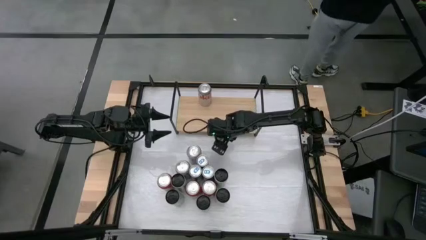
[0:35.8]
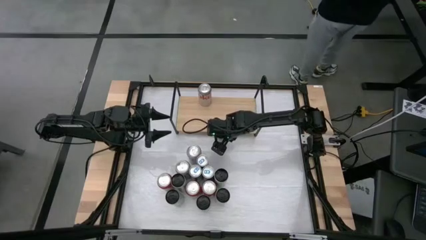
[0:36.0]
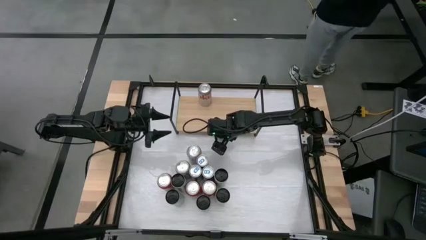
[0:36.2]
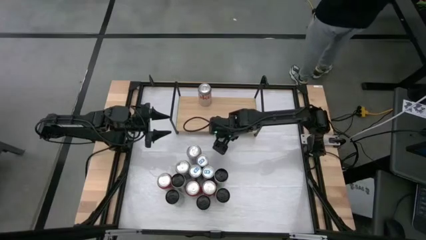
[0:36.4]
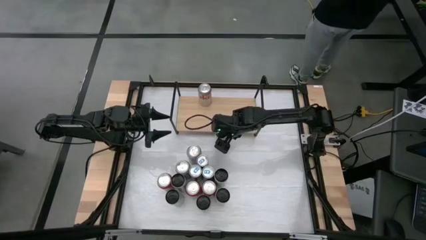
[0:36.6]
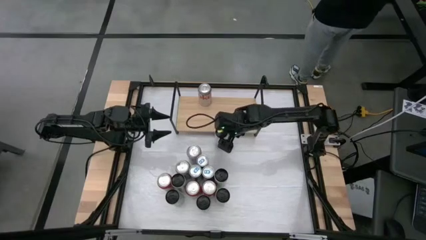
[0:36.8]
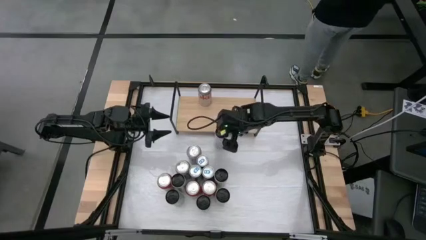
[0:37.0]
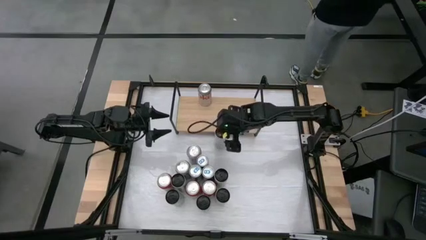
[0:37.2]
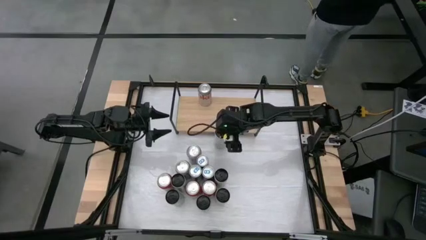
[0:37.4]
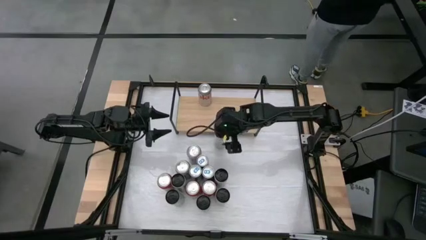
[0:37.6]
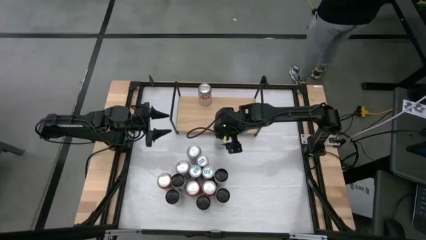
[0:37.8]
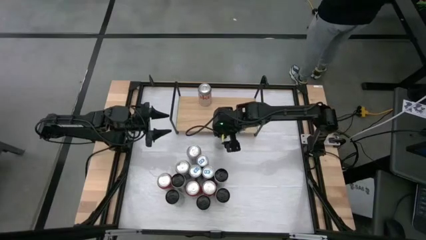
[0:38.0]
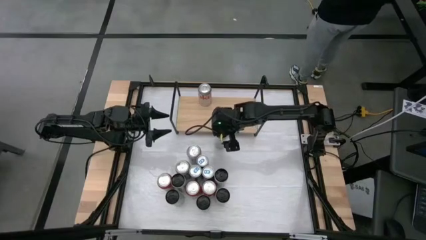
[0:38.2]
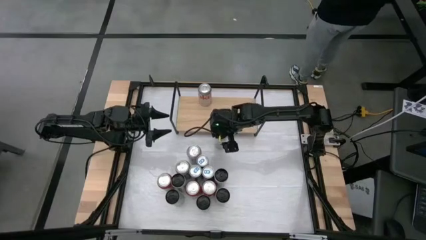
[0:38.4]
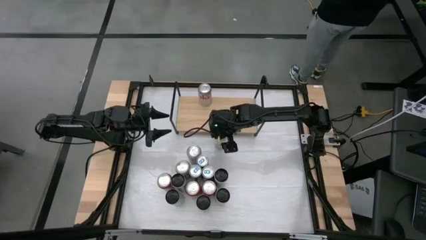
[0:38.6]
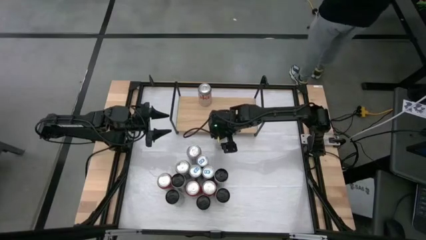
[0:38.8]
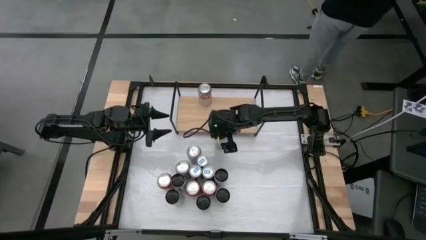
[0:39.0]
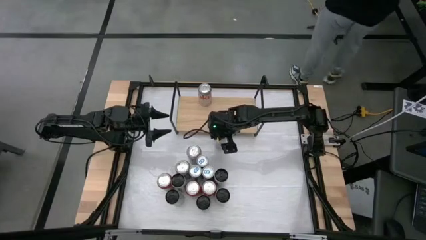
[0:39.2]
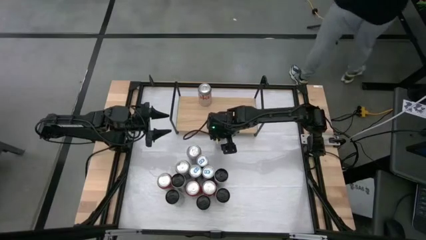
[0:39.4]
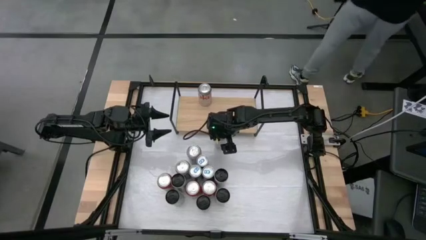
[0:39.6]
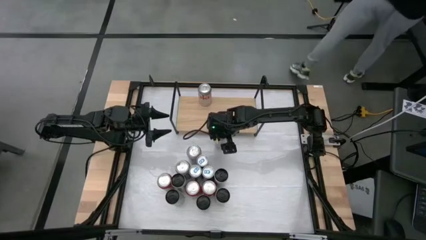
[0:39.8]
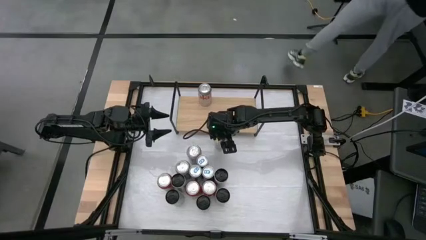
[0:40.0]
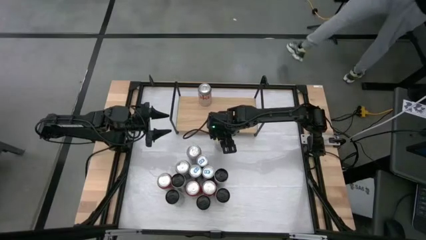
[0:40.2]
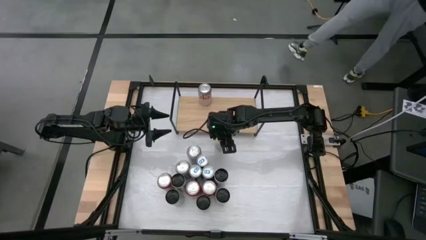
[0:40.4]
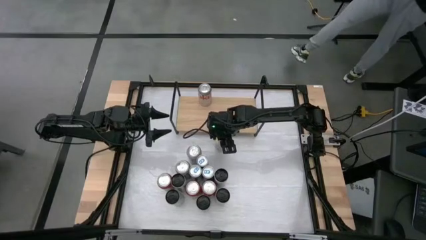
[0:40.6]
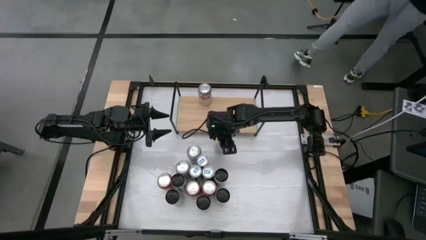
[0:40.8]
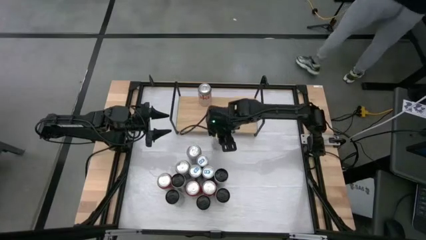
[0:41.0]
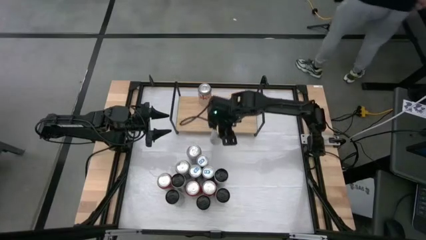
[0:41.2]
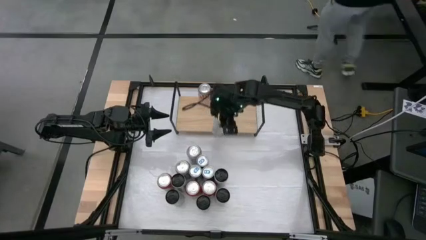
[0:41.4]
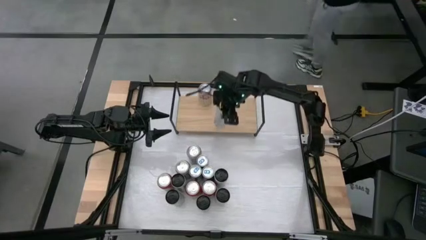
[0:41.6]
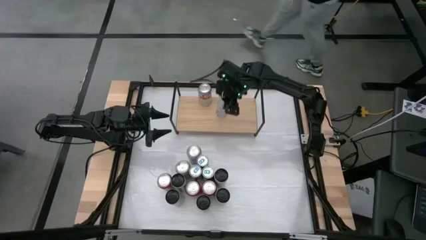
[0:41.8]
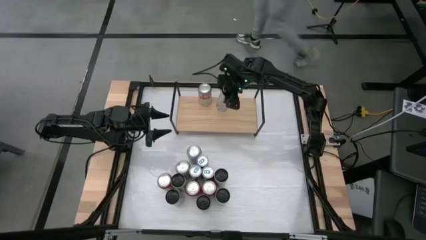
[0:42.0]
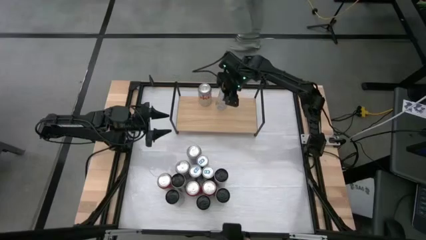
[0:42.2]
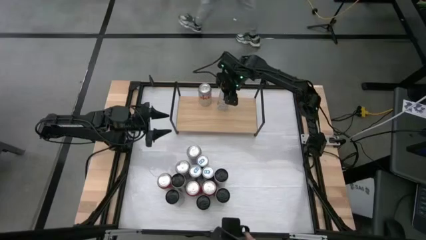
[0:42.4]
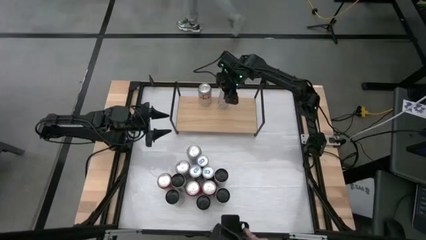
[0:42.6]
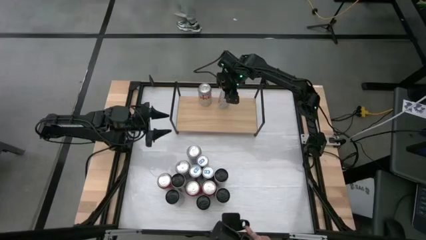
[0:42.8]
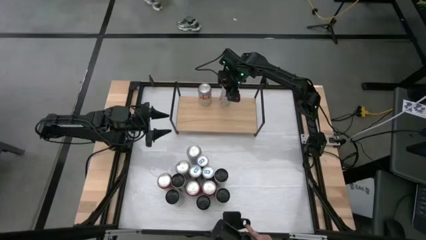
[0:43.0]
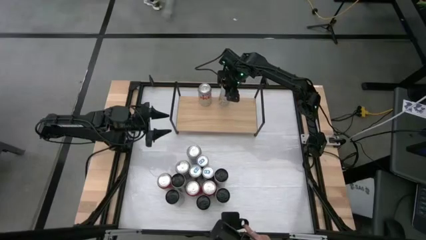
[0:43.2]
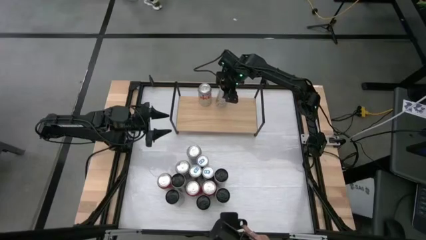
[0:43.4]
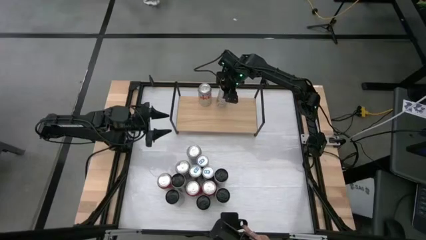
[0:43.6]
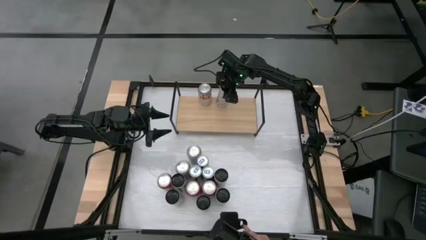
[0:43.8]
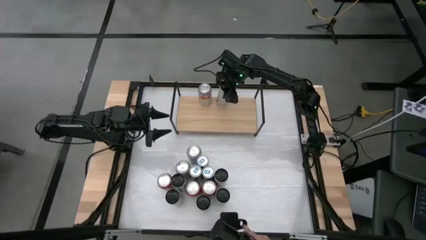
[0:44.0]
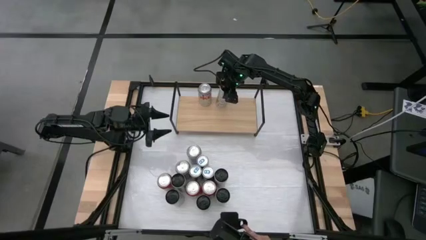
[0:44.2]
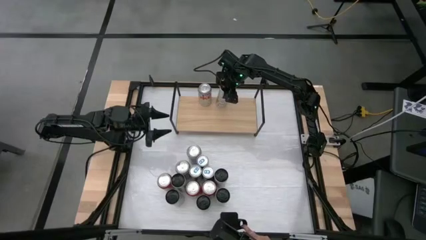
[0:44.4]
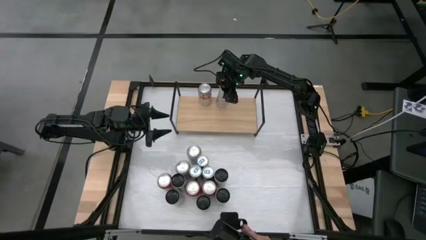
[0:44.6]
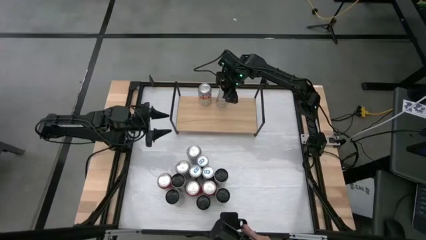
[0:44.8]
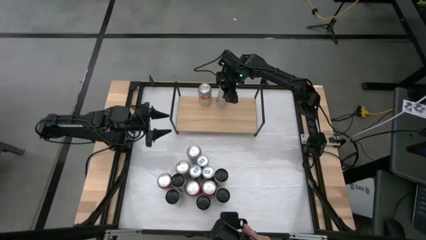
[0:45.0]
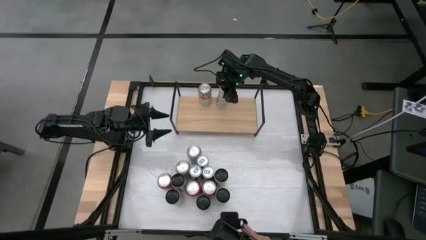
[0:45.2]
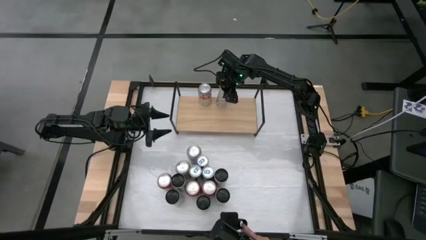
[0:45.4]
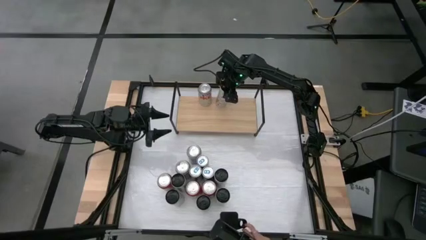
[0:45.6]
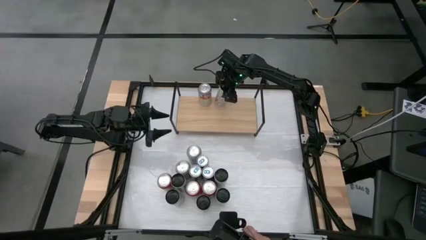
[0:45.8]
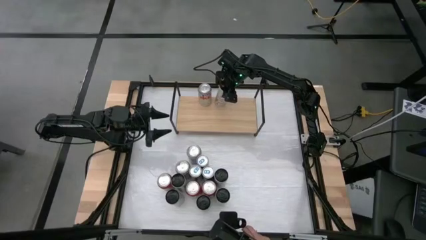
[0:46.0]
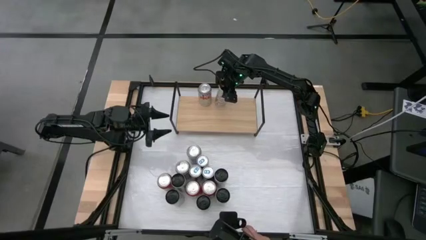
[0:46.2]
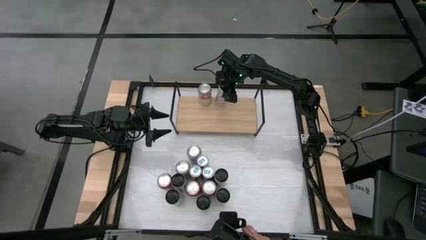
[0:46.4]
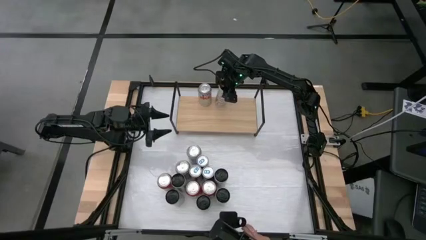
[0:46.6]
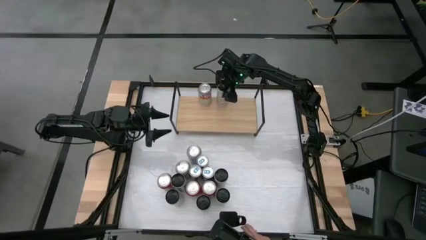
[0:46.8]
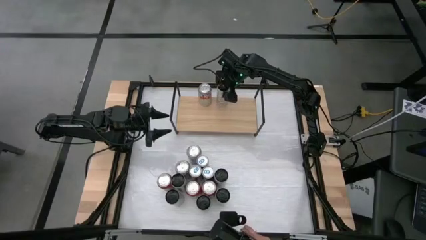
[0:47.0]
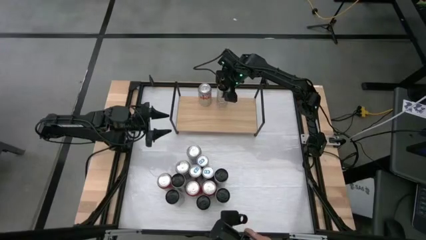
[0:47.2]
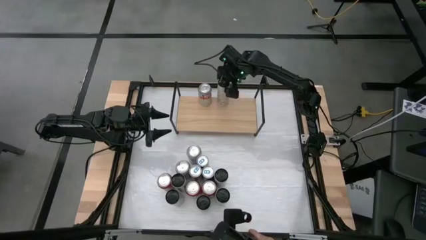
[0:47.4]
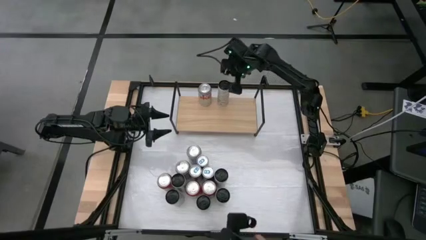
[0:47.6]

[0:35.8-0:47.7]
Task: Place canned beverage on shelf
Put the white yellow soda can onto the shelf

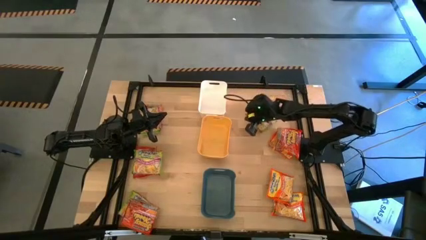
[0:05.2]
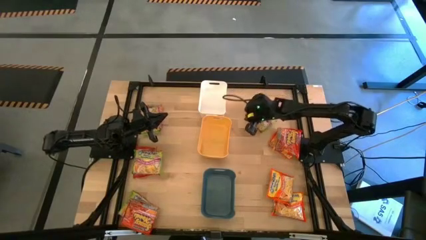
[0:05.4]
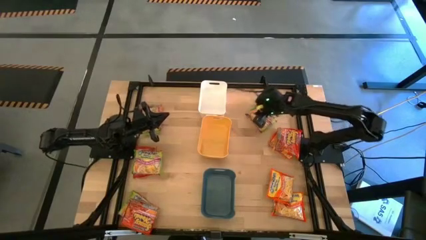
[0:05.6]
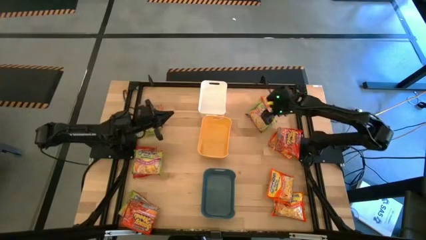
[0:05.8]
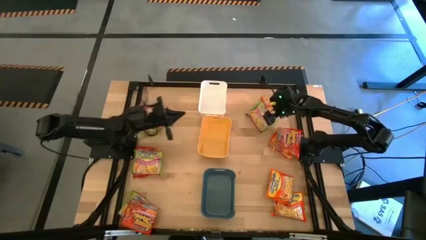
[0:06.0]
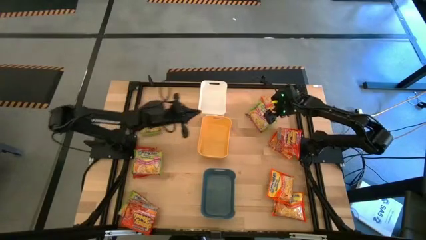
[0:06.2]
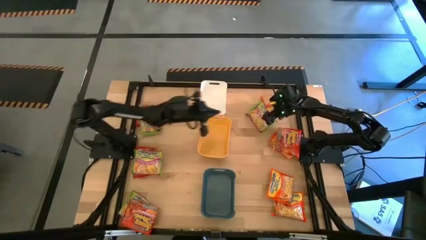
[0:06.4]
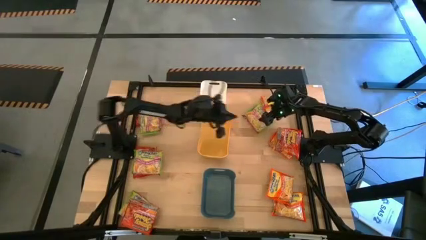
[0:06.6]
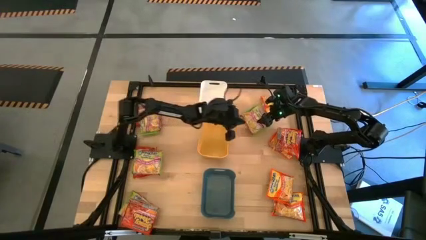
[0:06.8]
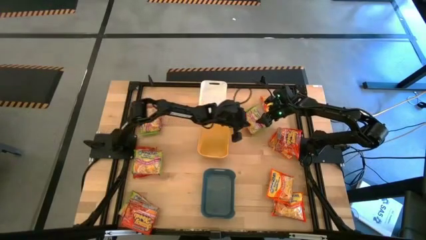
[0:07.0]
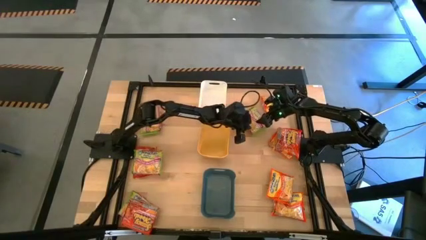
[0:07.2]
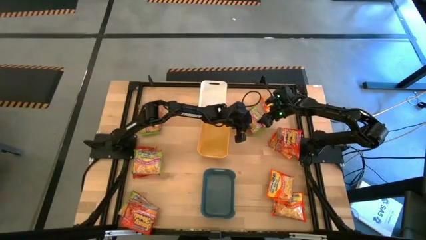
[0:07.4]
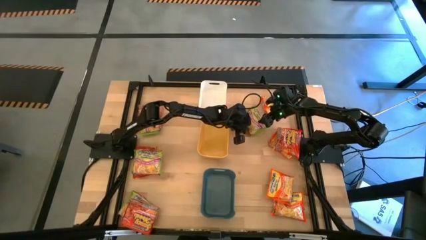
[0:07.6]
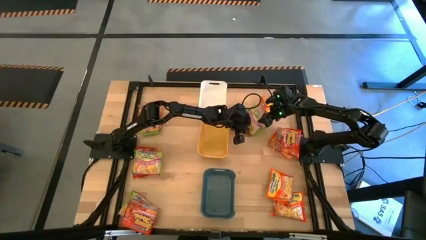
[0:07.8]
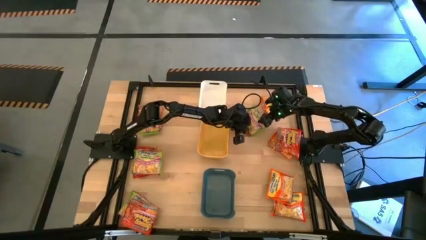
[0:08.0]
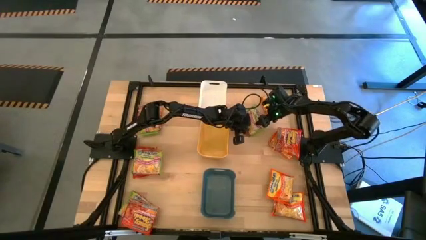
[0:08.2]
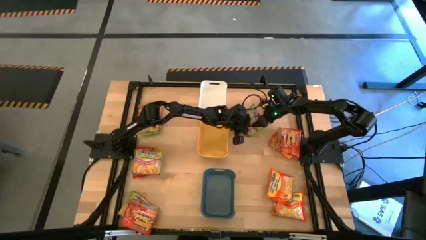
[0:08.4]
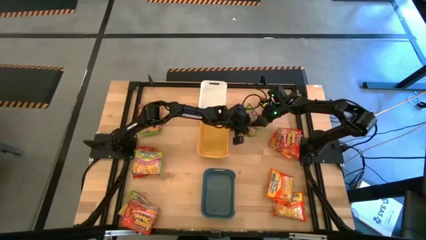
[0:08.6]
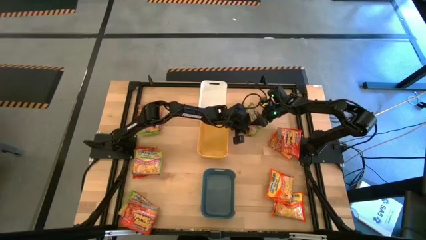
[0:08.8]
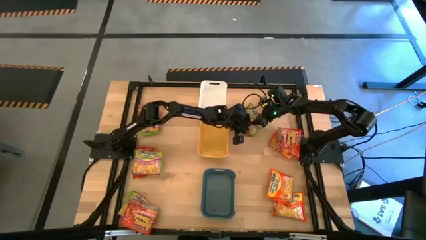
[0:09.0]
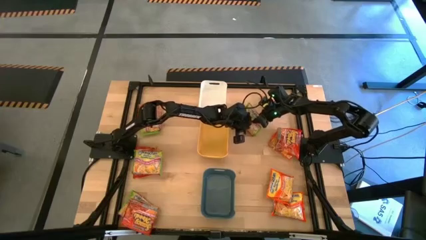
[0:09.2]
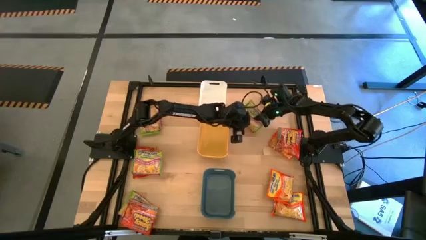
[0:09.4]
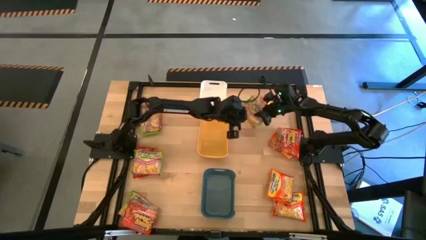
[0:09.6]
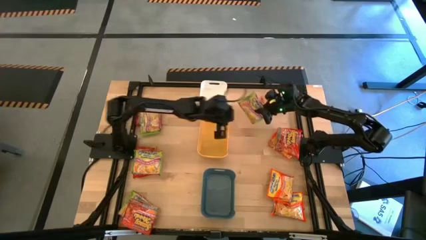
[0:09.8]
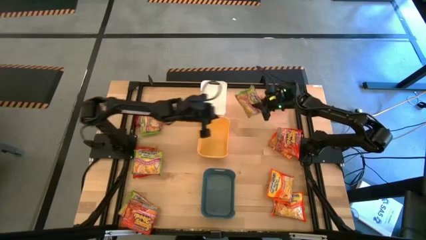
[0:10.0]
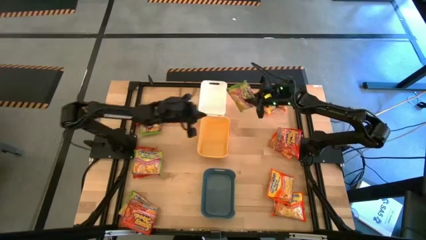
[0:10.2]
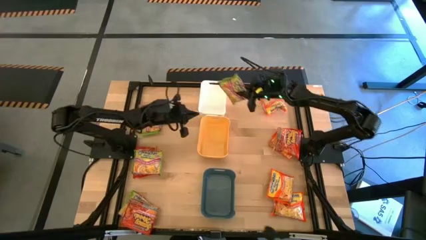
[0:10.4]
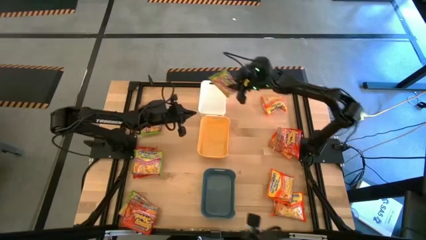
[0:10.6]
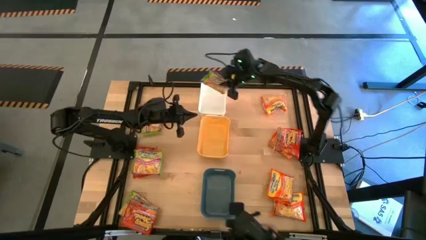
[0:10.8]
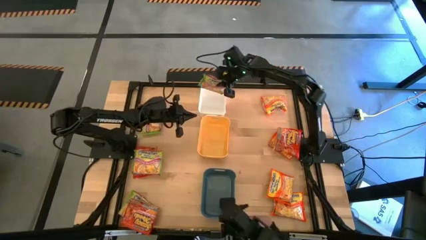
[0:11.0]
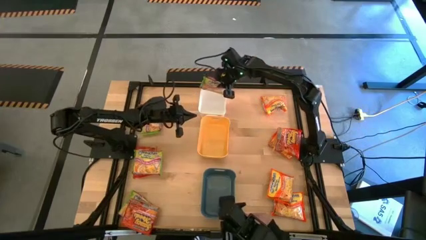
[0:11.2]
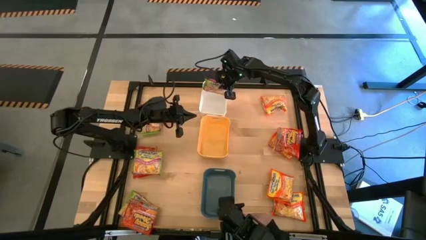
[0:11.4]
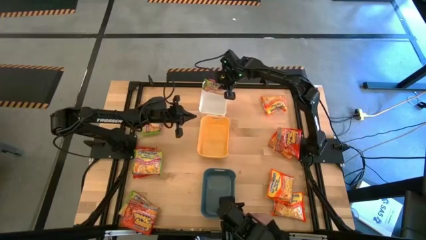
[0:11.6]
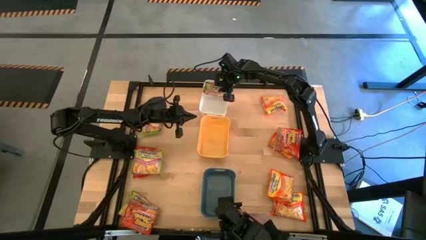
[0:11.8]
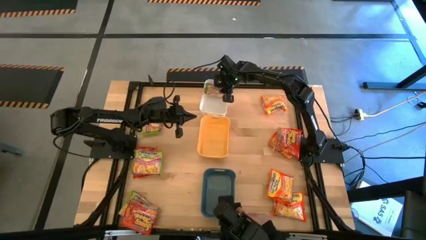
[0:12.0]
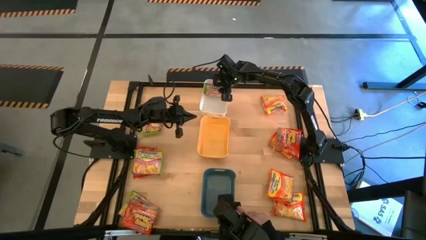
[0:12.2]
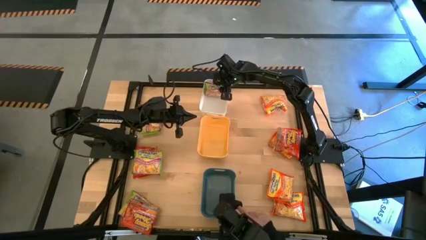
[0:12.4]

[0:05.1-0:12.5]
Task: Sort Maruchan noodles
Put the green noodle pack into the white bin
